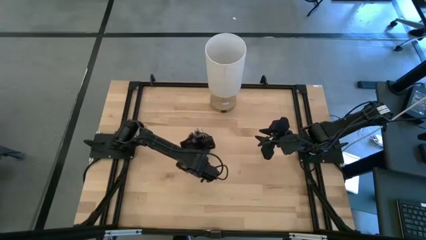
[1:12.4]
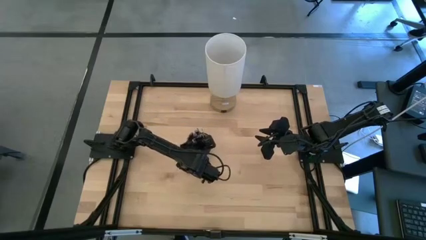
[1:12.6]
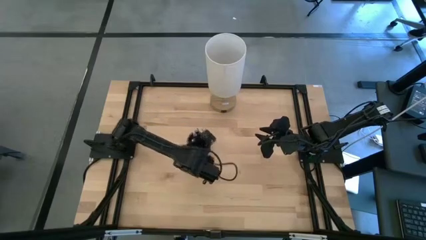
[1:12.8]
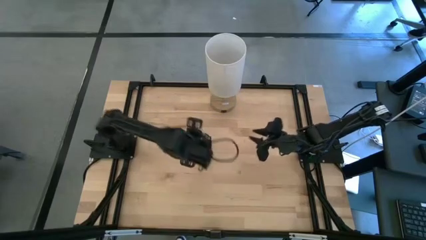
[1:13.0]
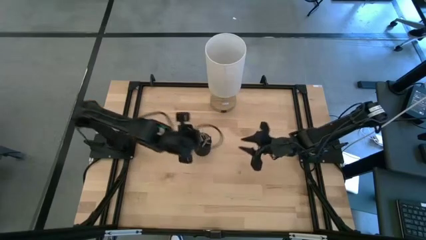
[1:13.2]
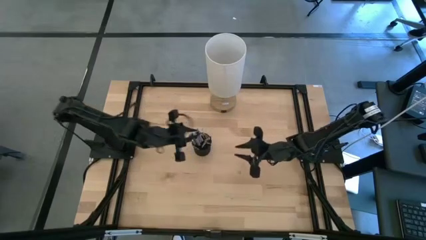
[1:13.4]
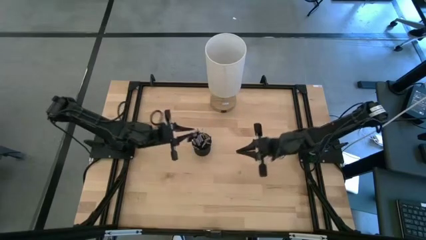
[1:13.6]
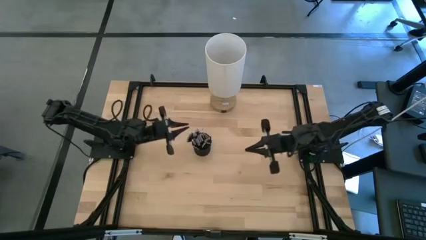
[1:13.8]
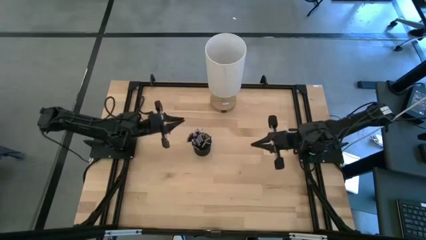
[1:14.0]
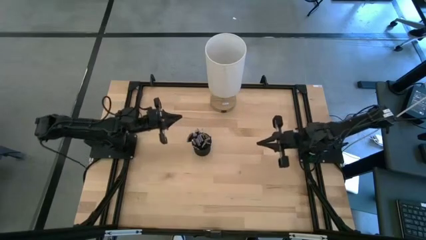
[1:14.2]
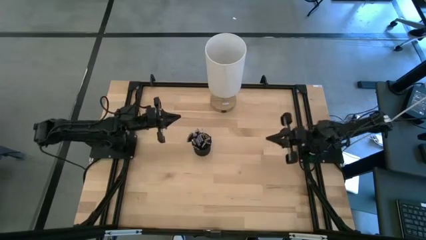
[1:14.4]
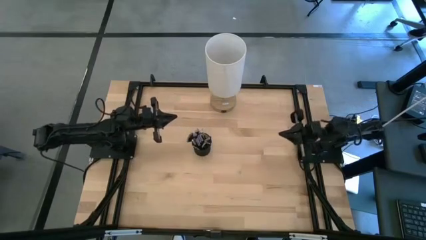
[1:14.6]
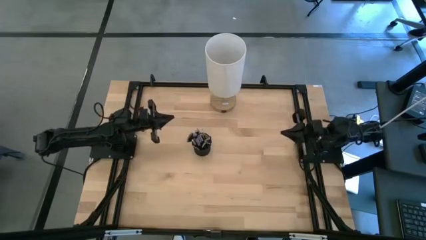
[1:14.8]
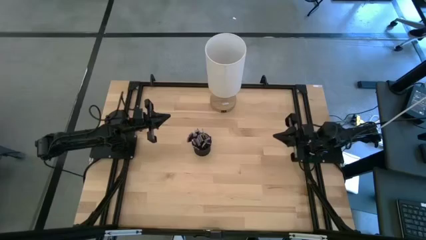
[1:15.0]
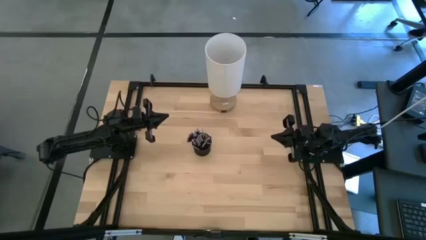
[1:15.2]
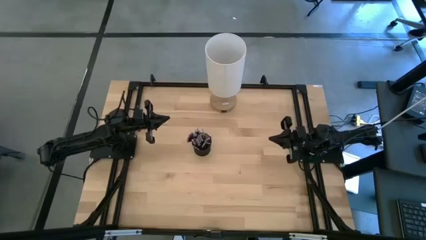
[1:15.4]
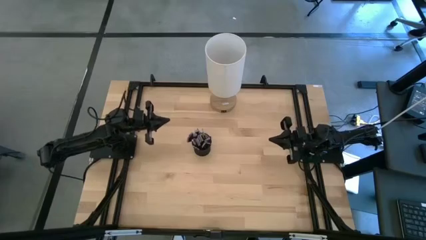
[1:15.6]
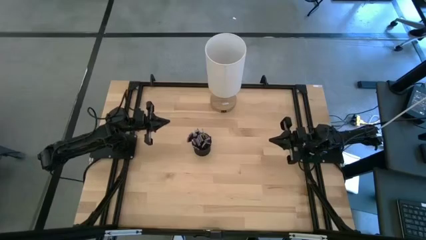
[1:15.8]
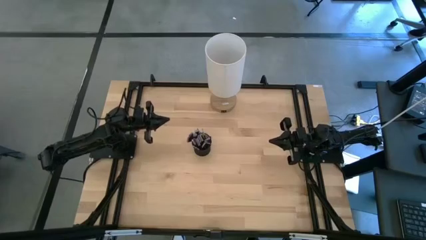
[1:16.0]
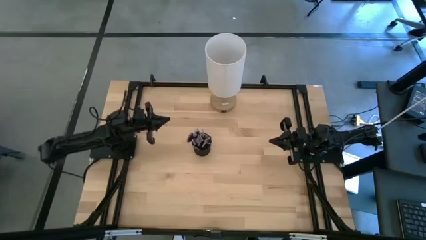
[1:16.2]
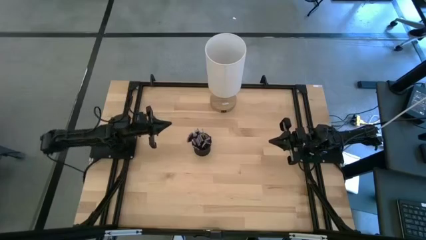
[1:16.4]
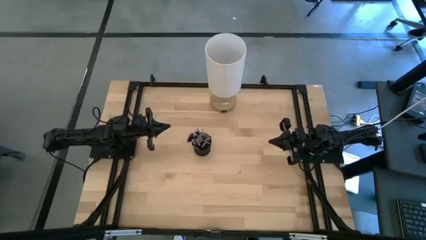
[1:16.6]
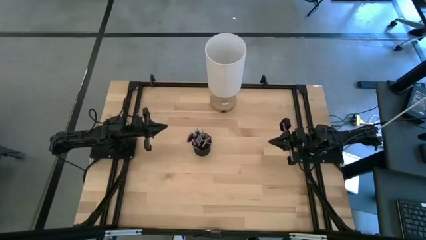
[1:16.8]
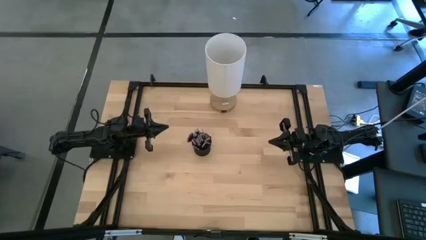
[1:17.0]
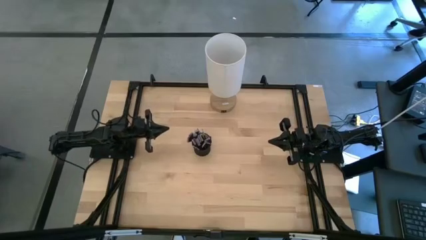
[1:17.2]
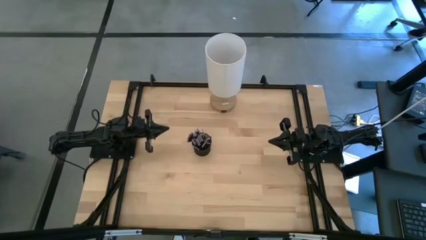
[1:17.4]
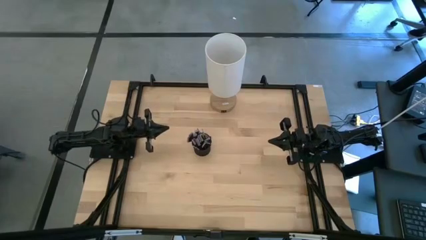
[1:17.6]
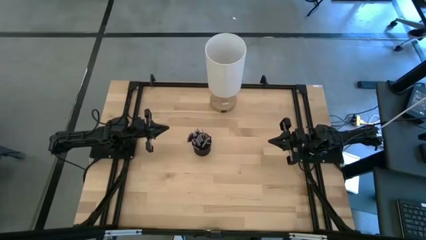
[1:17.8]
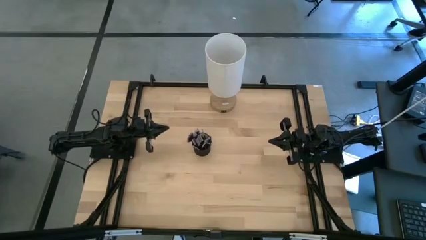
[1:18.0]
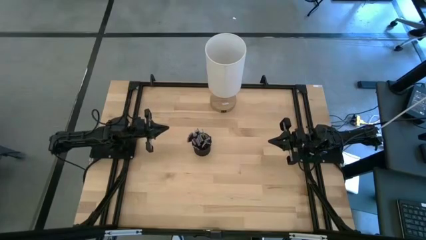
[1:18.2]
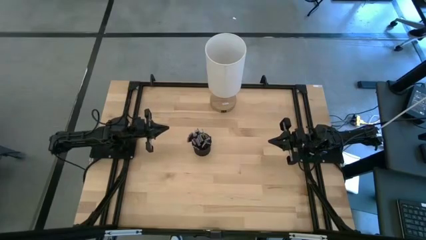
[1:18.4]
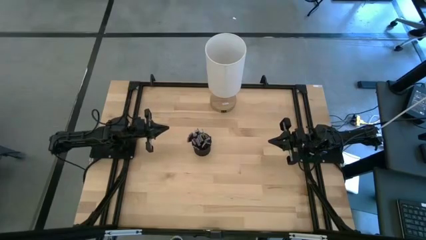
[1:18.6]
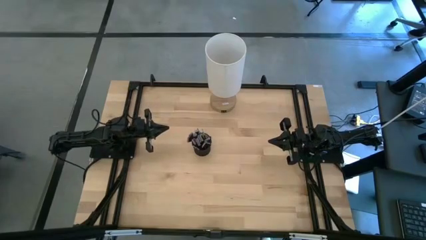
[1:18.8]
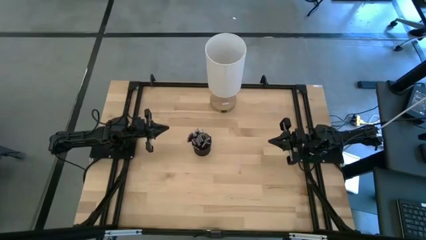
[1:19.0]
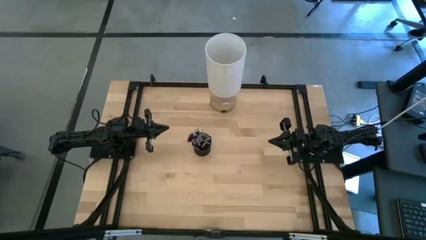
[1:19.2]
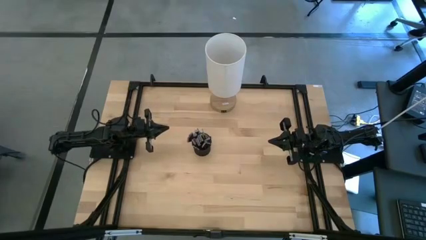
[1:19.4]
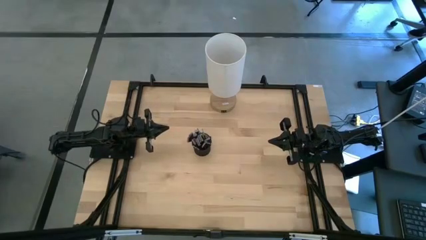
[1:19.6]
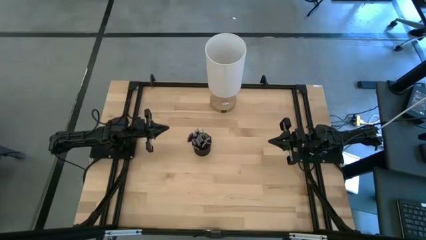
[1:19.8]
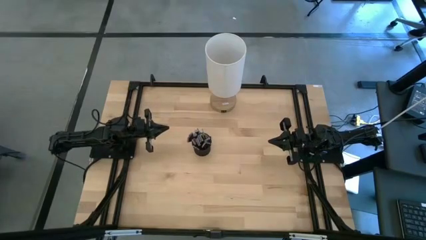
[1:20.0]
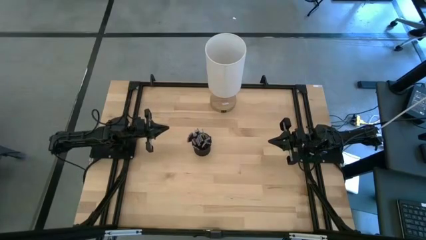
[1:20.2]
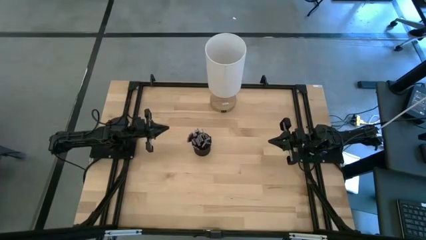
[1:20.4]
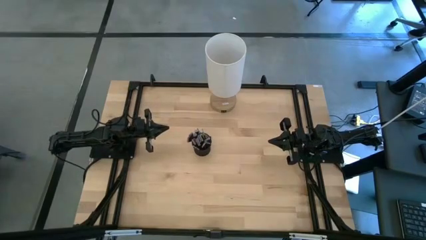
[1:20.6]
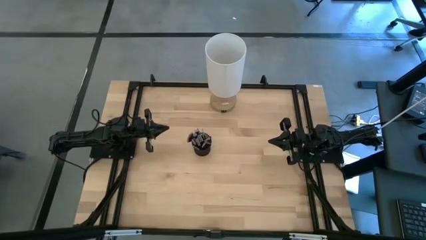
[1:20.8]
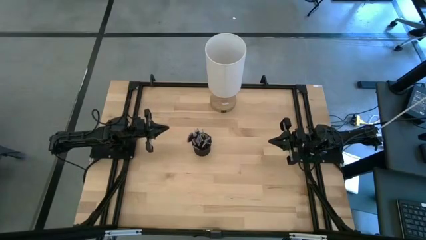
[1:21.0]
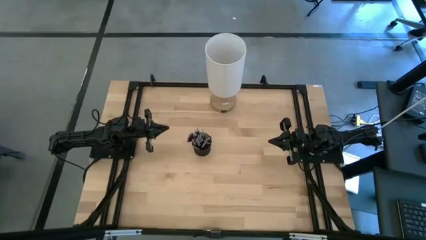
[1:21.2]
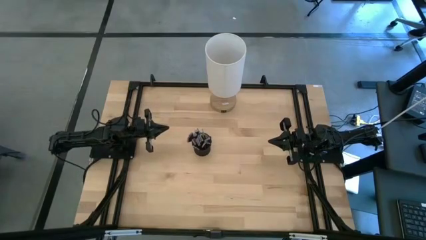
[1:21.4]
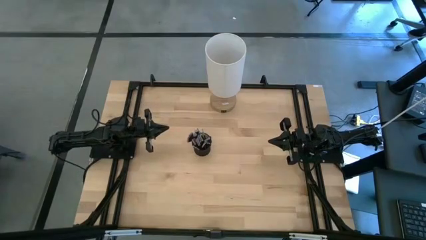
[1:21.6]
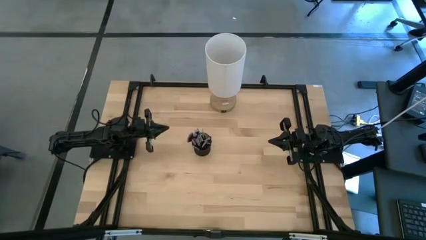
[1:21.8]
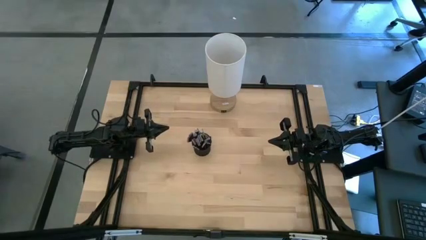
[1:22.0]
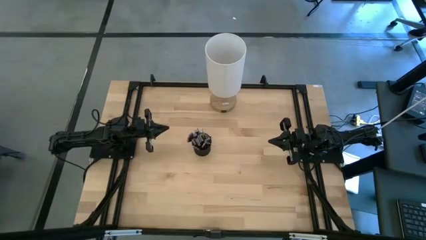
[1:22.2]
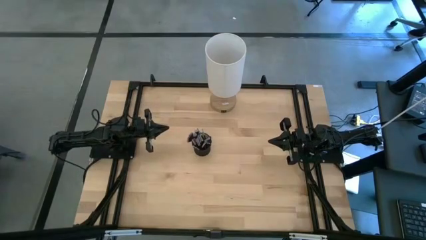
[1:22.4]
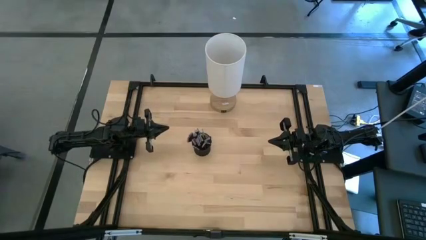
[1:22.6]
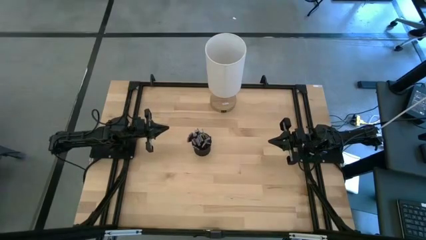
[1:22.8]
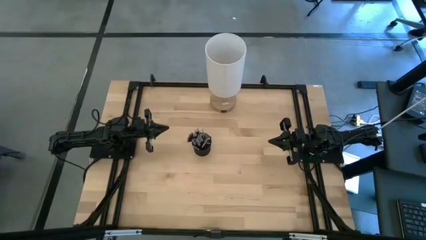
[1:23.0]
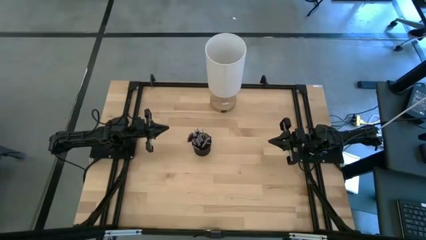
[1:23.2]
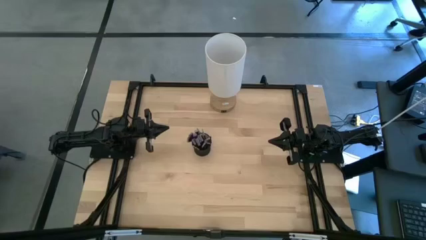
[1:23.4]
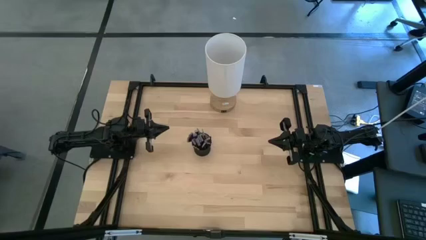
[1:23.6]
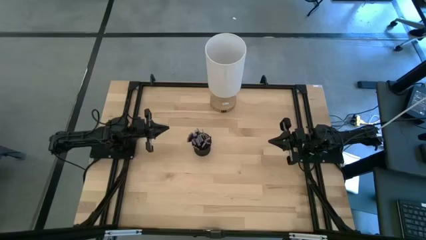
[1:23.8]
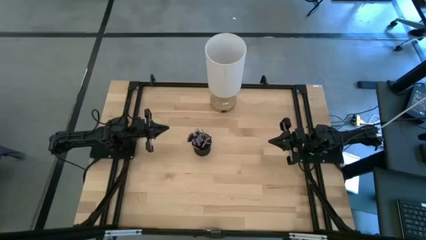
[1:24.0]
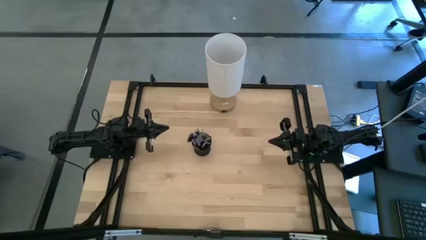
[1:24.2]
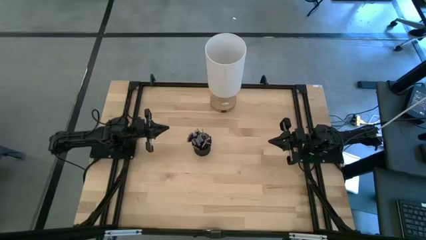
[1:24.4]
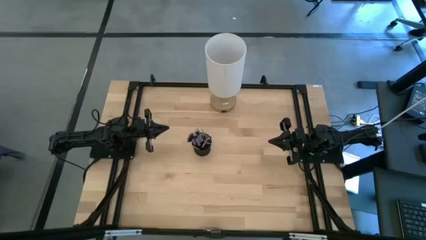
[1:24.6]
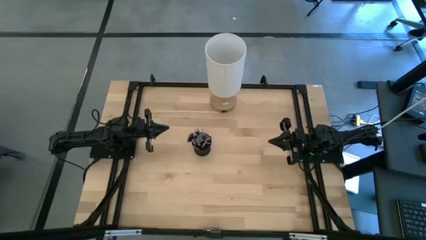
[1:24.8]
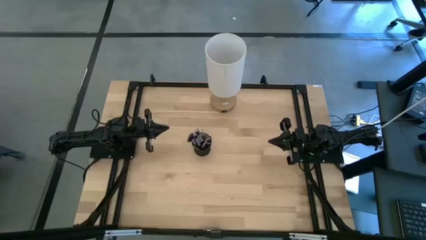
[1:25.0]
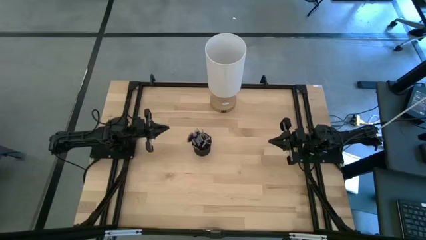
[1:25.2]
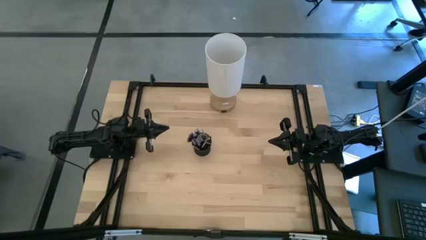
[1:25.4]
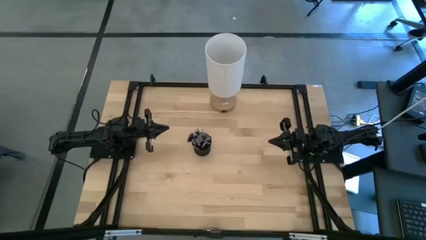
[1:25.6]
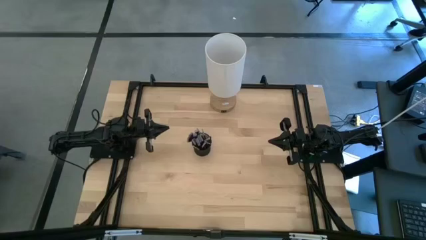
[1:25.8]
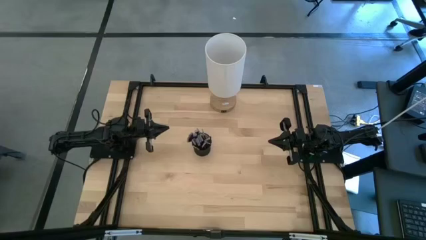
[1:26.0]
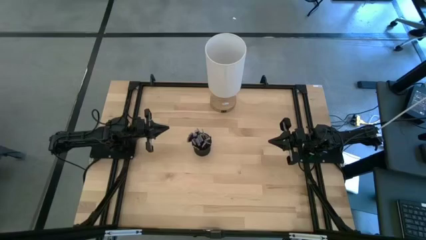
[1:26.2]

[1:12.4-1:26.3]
Task: Put items in baskets/containers
Return to Home Position

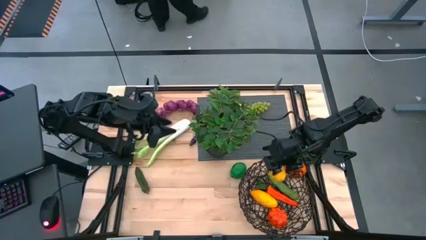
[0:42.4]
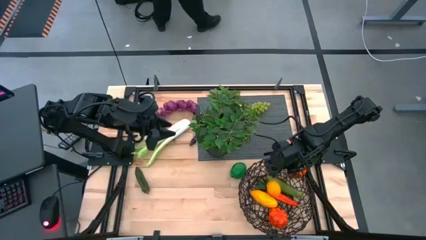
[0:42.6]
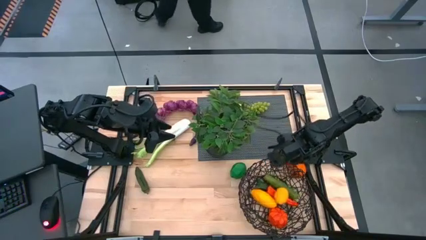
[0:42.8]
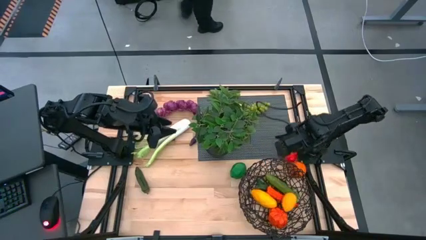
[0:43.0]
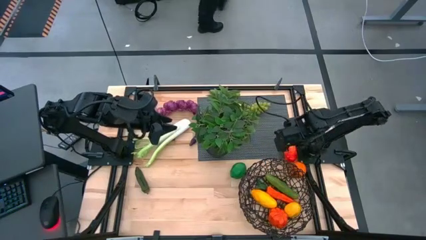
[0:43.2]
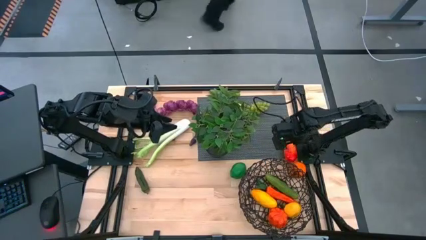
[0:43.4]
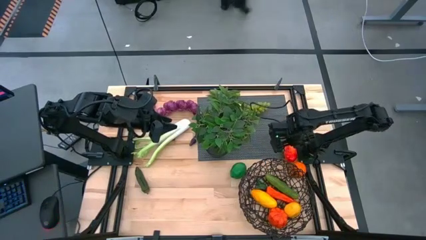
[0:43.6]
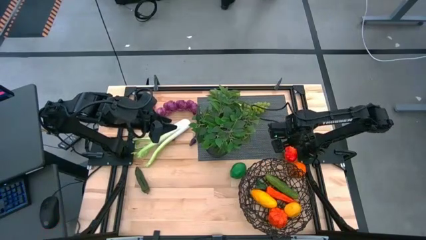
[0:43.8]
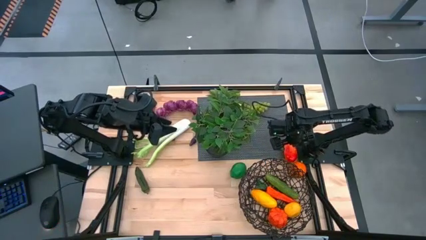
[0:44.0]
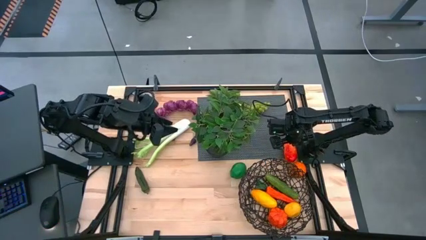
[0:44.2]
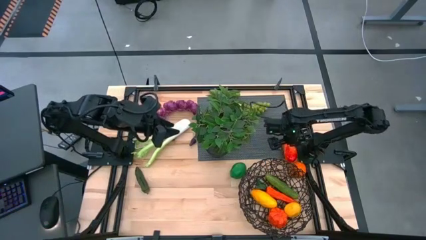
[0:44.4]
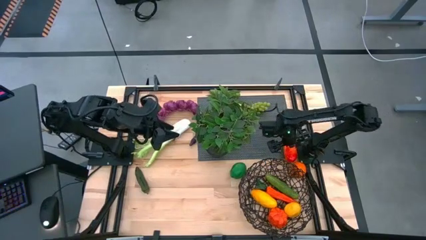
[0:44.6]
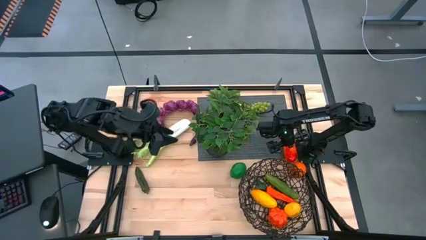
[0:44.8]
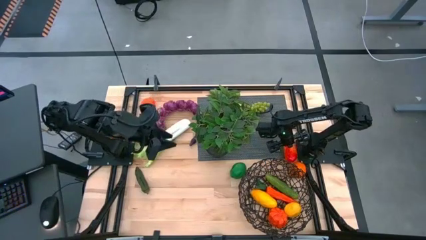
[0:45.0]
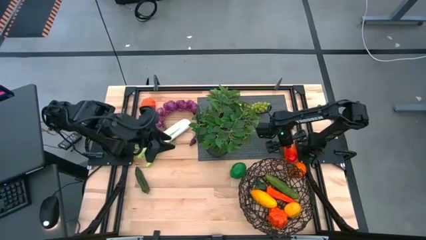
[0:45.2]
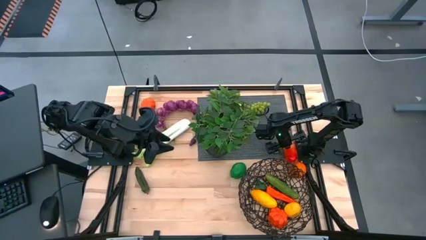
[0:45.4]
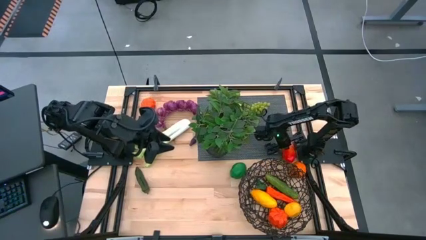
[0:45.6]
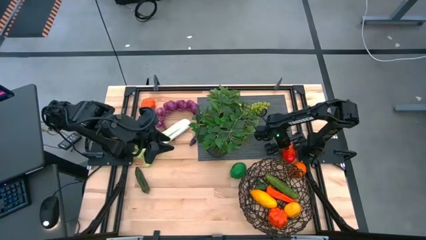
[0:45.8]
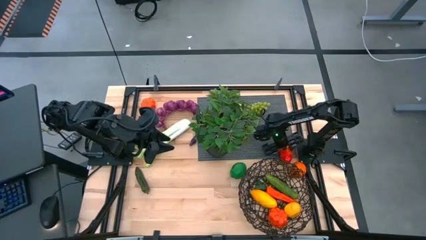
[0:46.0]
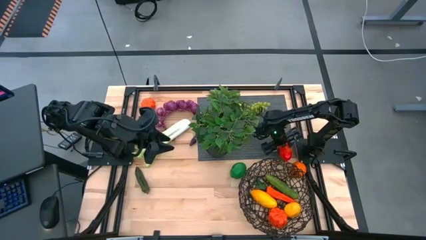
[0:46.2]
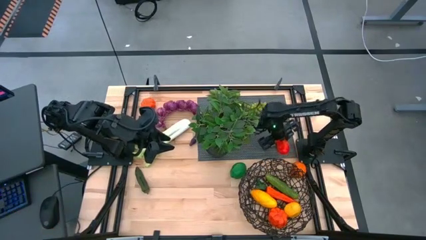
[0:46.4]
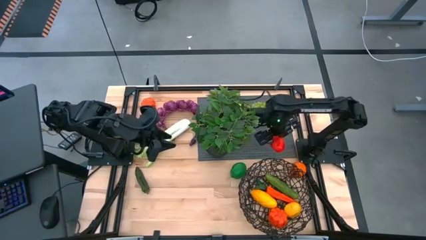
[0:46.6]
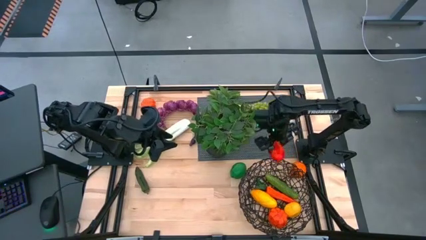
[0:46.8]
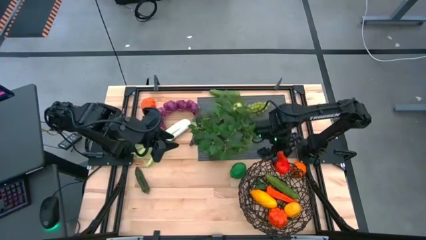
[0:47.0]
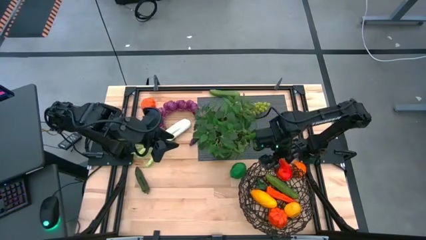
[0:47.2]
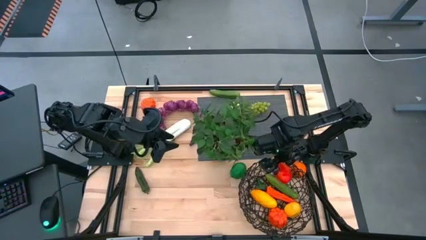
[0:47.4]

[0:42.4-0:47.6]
Task: Build produce basket
Put the red mango into the brown wire basket
